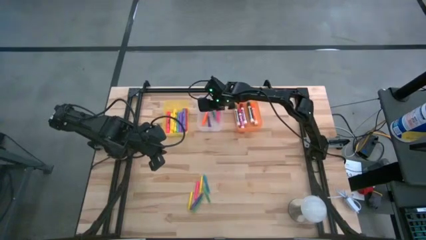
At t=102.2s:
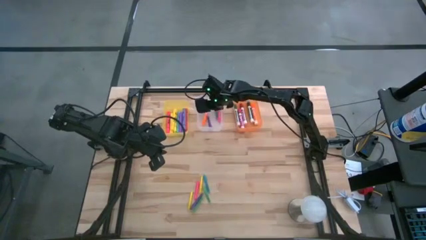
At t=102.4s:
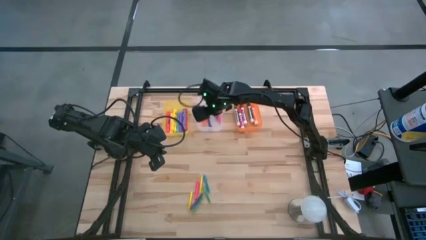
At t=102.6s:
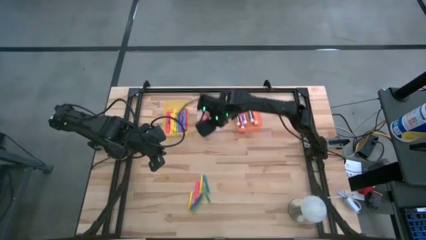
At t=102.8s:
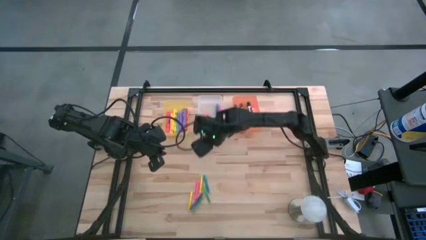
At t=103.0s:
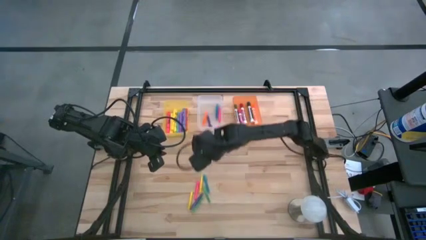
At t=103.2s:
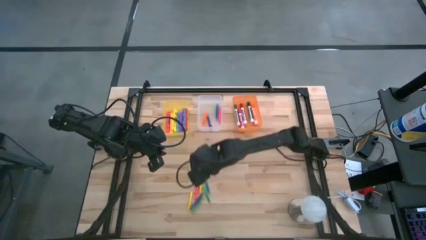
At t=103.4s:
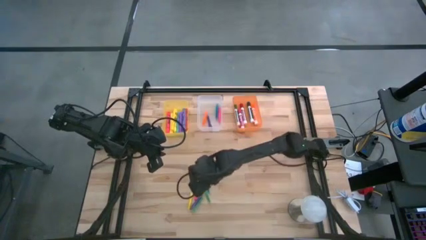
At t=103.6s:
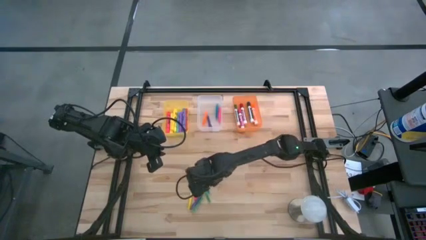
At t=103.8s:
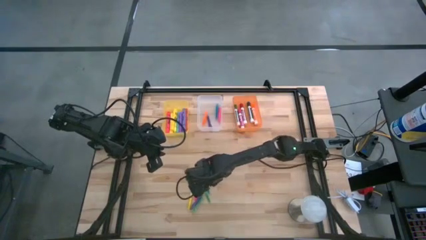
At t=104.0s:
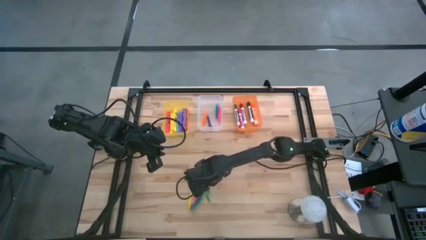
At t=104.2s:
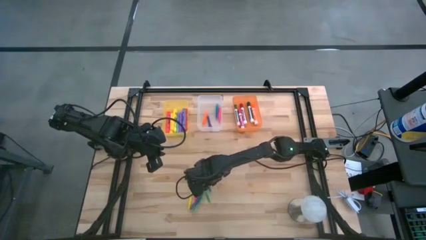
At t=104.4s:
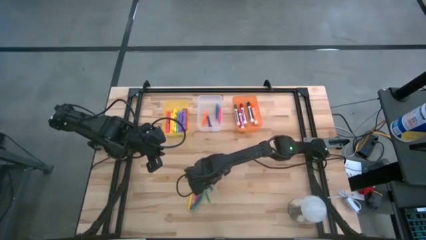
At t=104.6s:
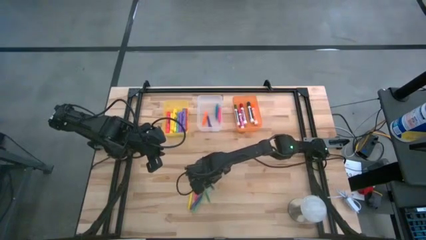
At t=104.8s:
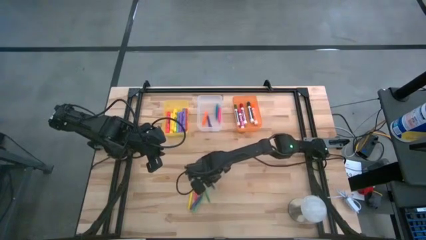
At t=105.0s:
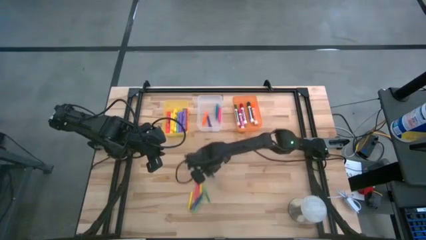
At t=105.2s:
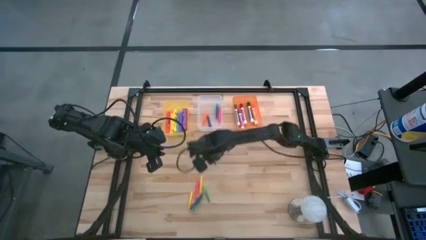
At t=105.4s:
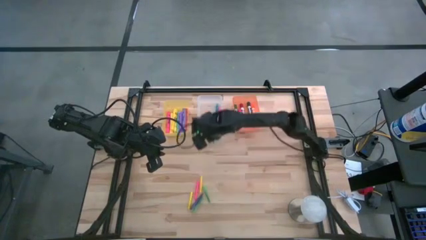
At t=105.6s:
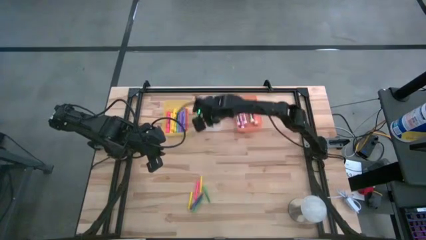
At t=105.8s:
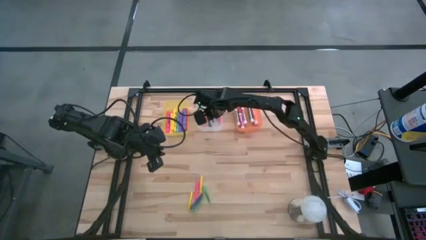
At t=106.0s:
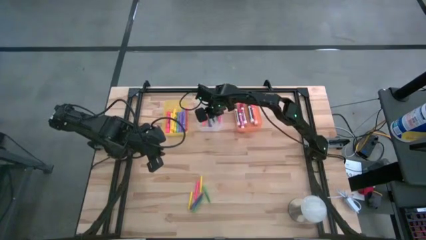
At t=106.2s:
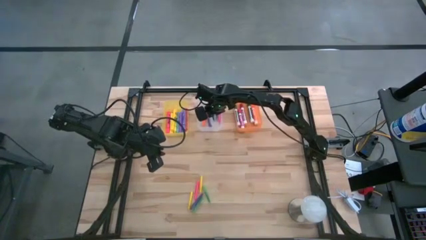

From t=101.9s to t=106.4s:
Task: Pick & Place Markers
Put the blue pen into the white bin

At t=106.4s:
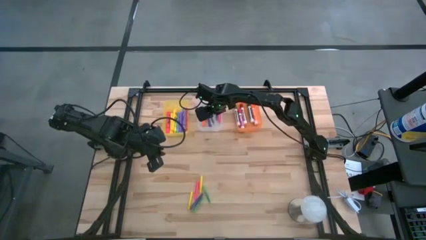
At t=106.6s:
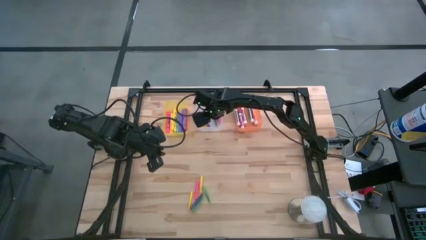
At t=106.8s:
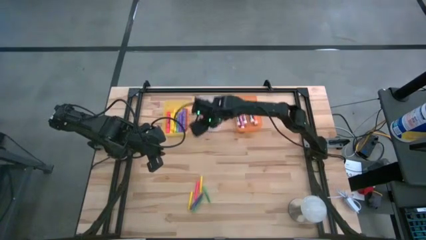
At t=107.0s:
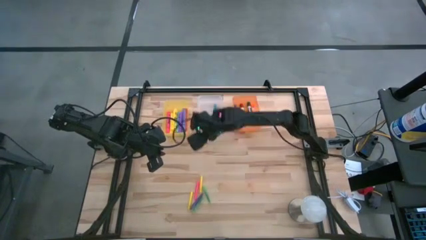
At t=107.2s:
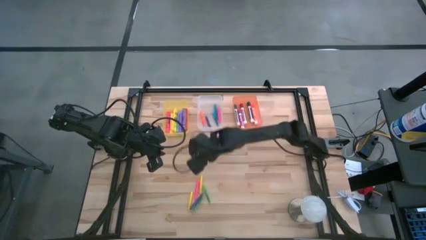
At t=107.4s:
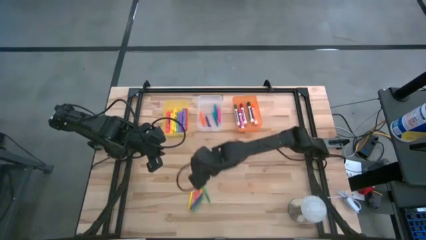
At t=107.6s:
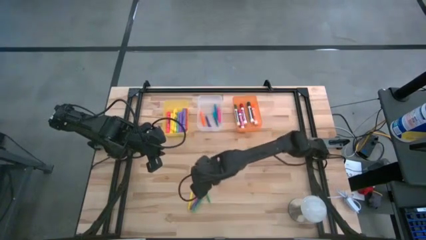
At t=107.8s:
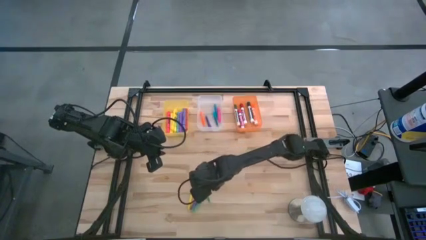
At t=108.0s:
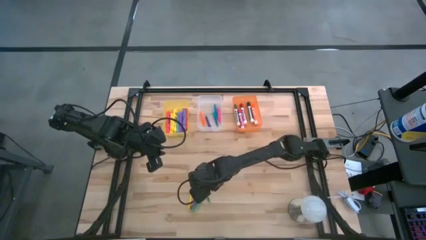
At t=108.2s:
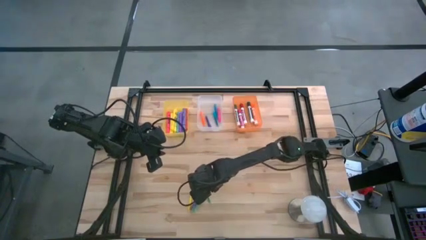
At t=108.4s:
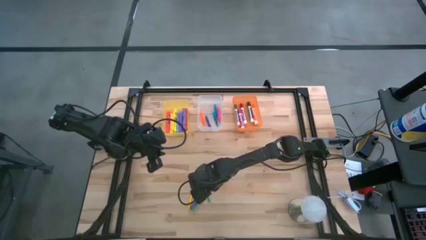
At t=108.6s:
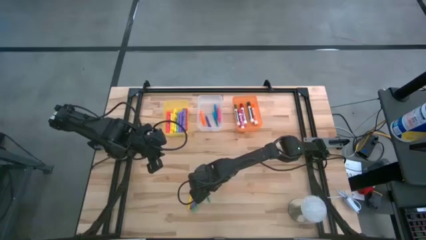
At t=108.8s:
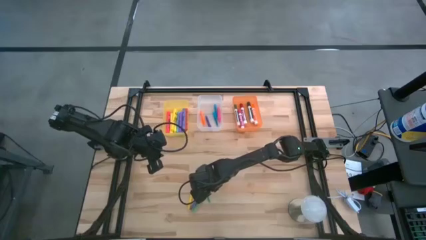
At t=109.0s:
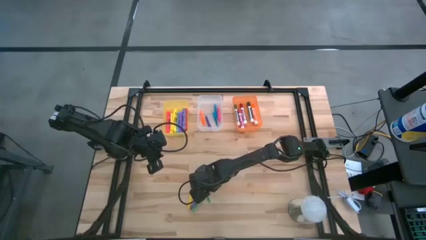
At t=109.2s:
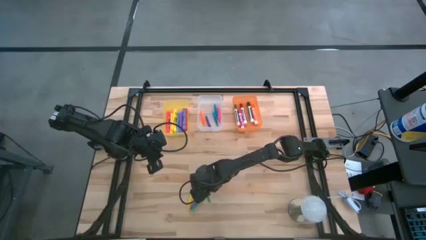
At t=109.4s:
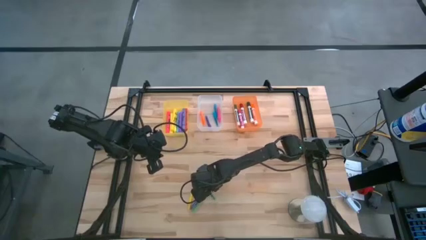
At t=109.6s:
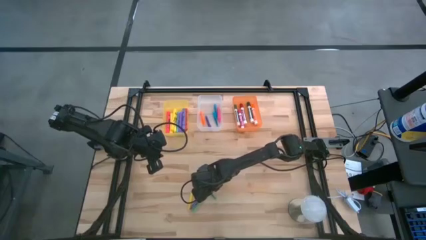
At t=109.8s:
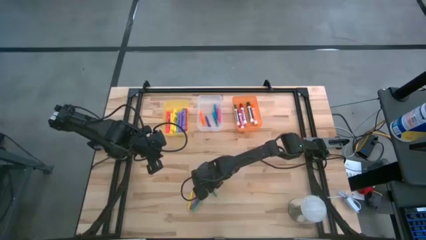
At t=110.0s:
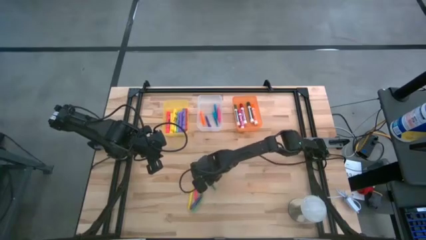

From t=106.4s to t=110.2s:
Put the top green pen into the white bin

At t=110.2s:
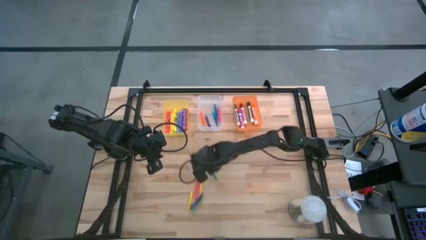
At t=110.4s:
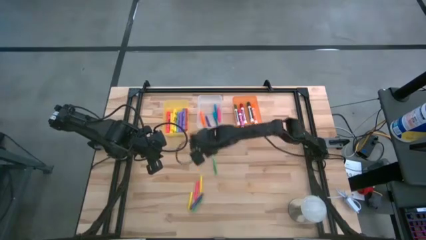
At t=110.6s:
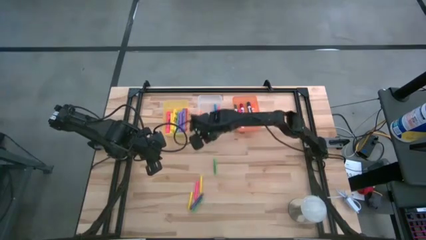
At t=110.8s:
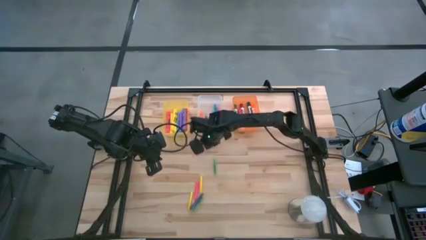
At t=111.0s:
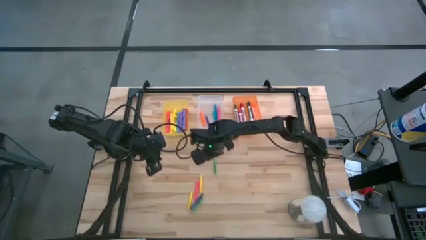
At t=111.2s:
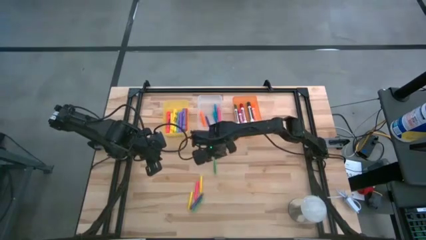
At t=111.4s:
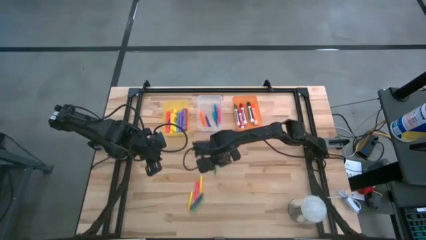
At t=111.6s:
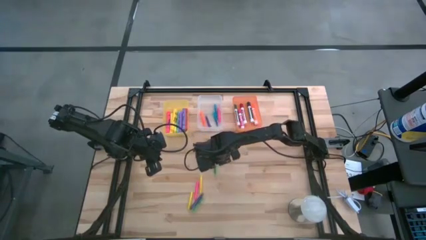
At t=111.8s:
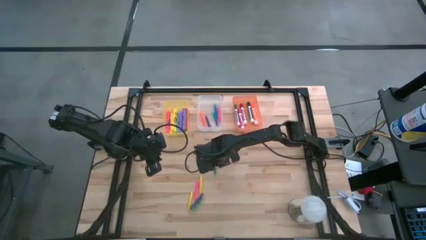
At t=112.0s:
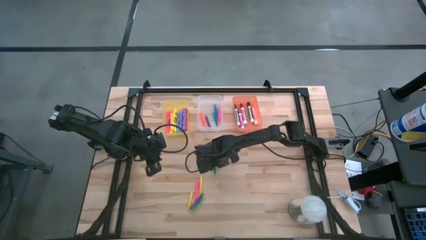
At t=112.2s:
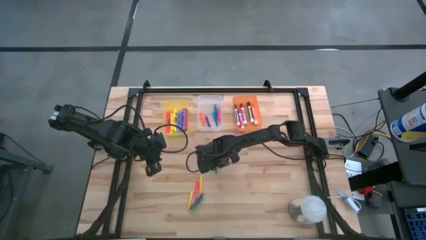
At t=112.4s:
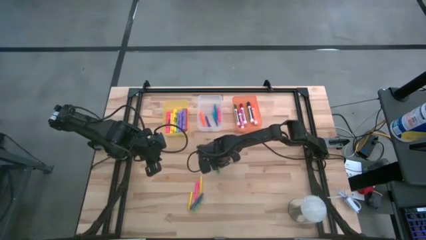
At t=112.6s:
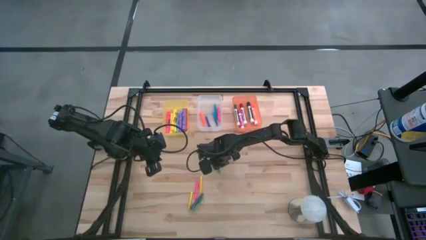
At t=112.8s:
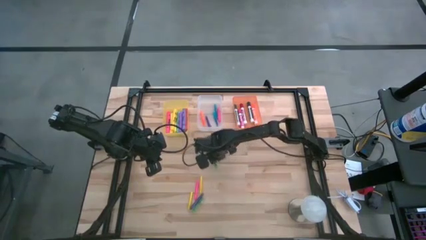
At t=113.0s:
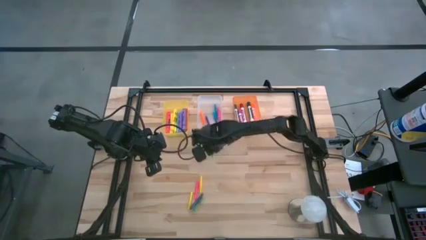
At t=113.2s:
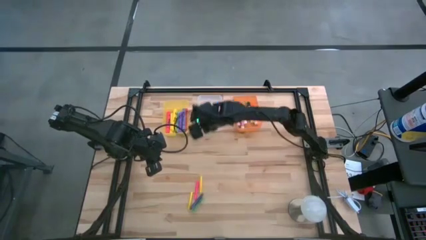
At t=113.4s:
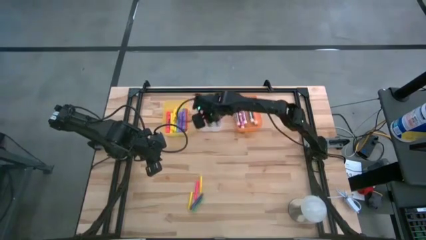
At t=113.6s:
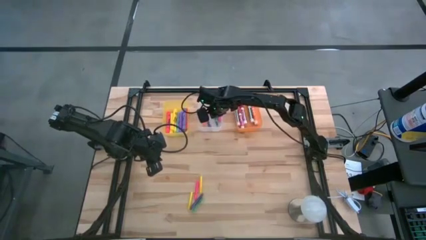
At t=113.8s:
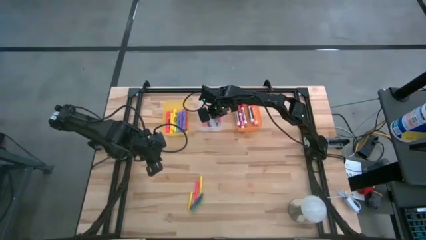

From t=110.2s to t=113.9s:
Put the top green pen into the white bin

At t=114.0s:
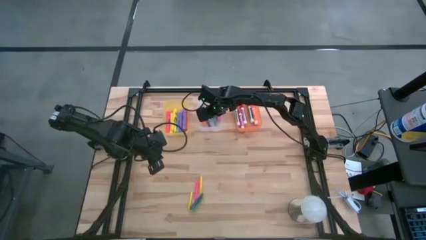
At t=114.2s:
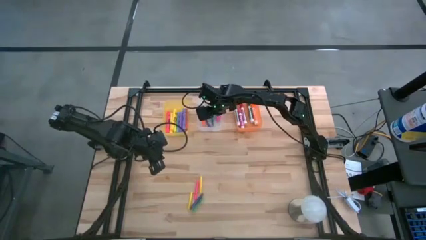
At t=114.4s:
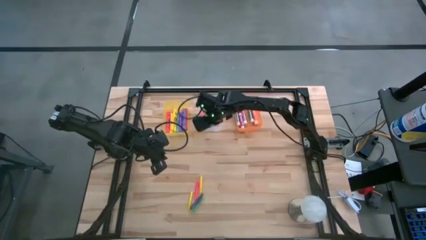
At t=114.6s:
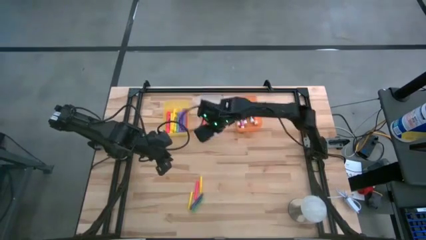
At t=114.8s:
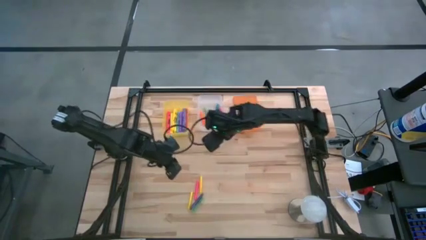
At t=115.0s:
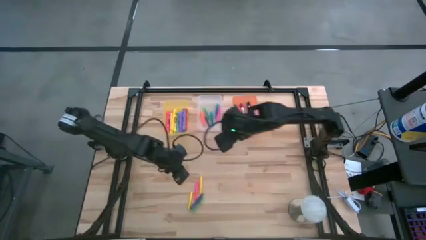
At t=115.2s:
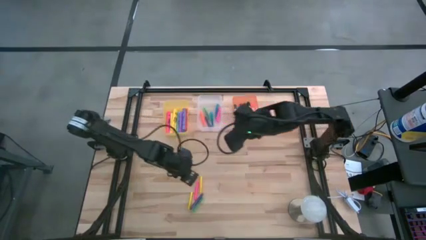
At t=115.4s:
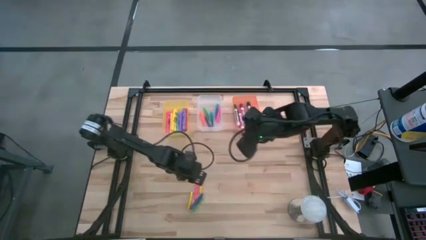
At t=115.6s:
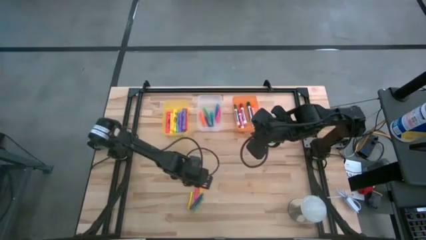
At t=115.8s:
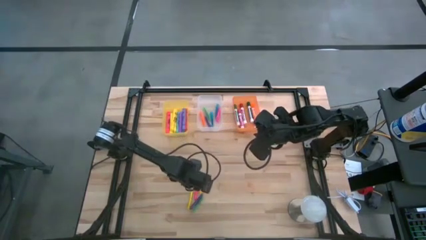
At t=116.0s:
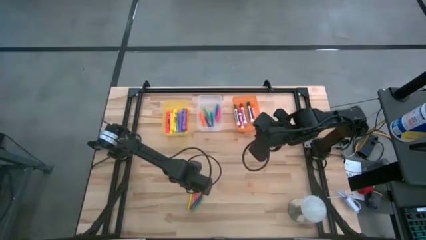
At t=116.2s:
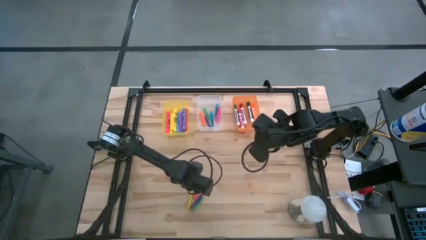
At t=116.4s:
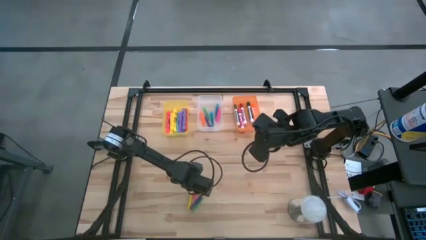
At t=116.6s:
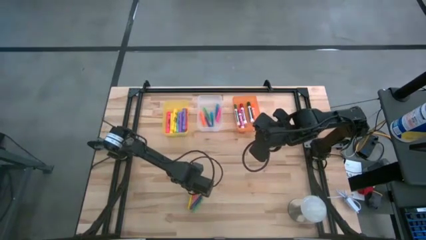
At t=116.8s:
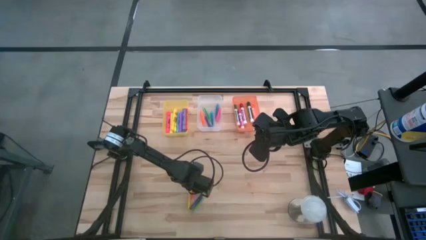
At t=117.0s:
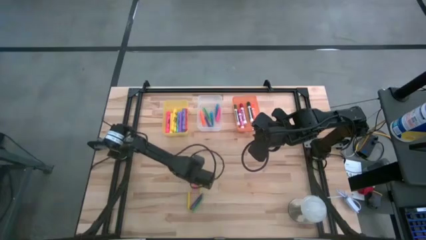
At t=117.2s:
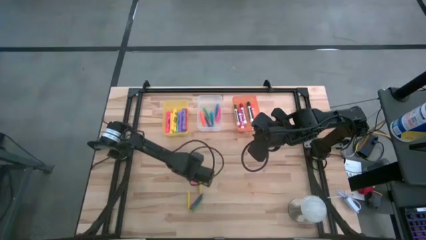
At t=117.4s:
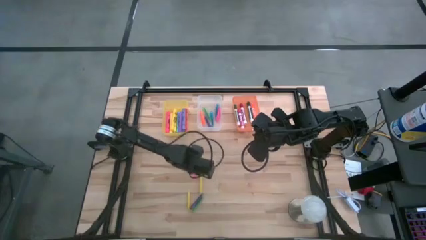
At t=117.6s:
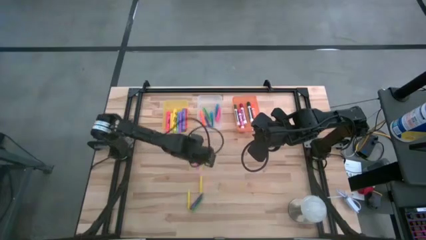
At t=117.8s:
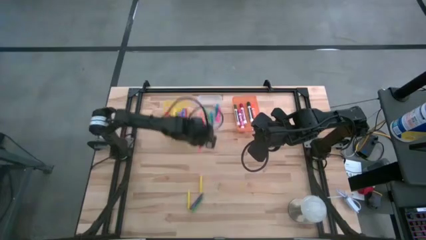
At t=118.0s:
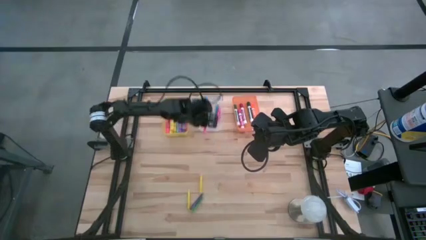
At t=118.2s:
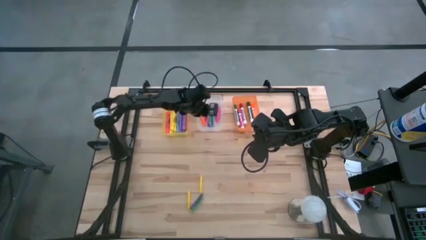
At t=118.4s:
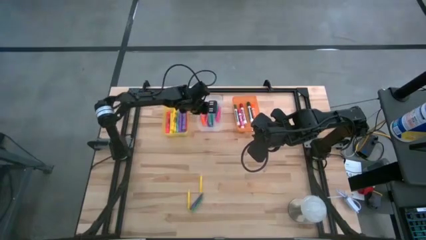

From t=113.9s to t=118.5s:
Put the pink pen into the white bin
